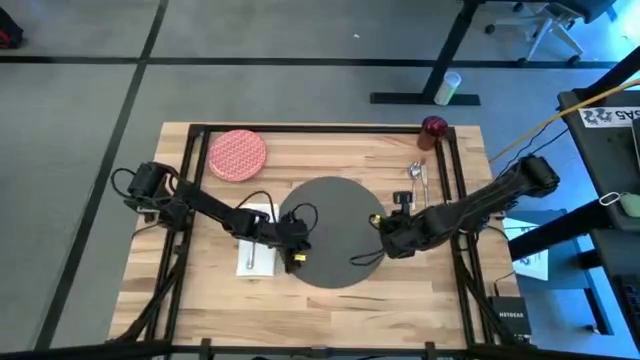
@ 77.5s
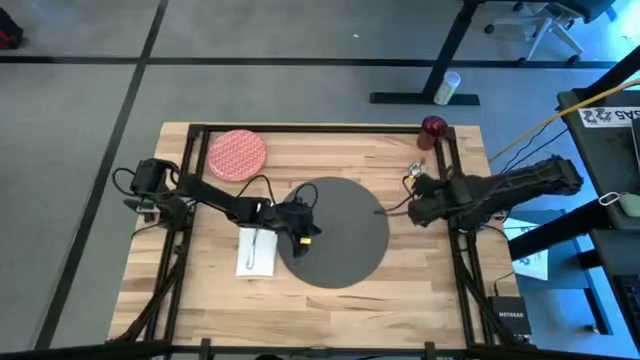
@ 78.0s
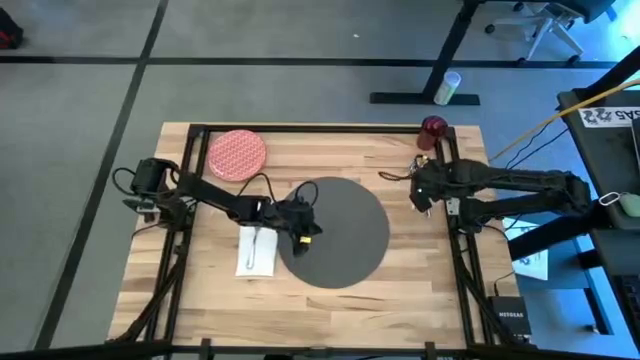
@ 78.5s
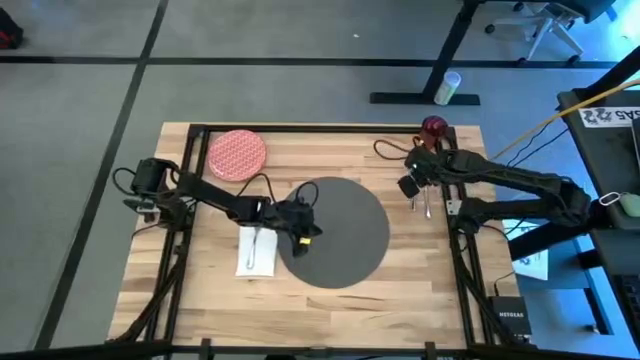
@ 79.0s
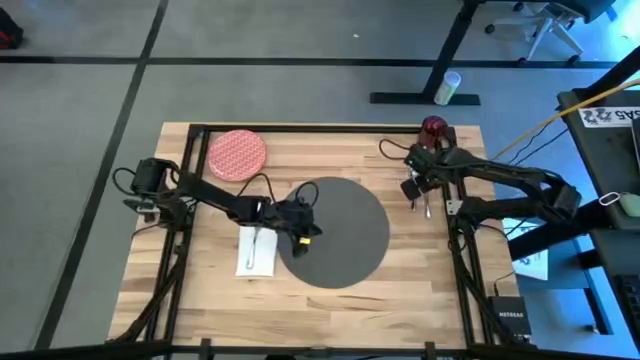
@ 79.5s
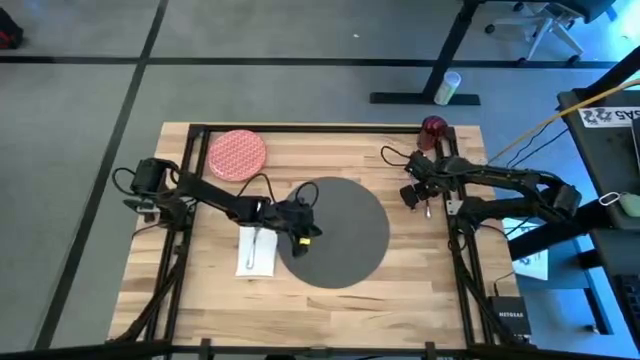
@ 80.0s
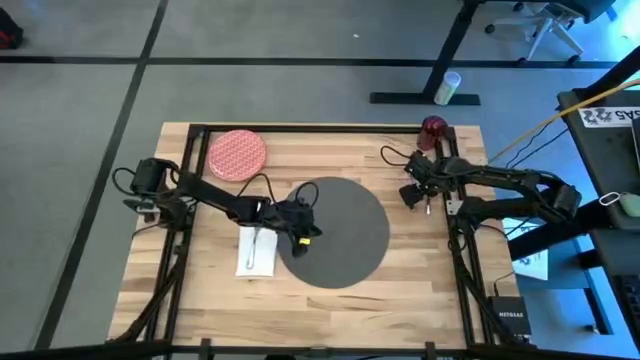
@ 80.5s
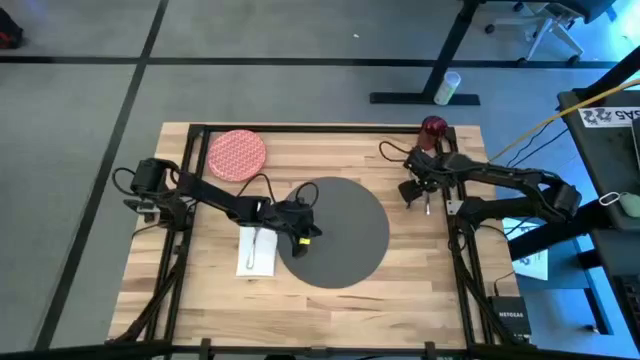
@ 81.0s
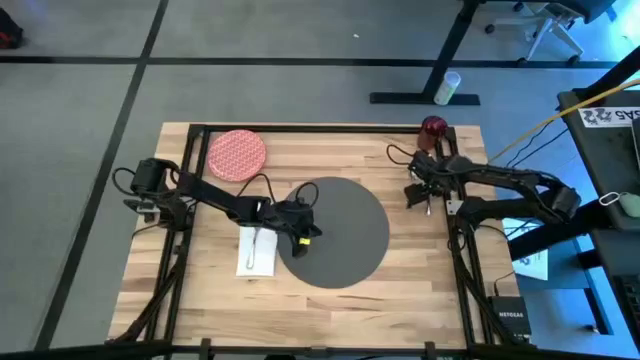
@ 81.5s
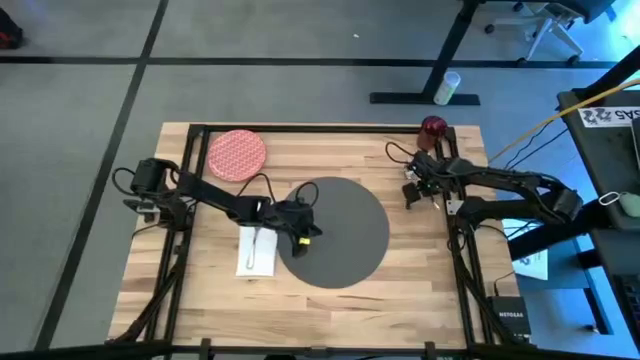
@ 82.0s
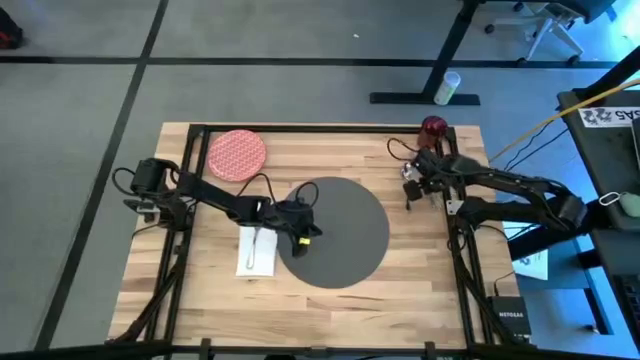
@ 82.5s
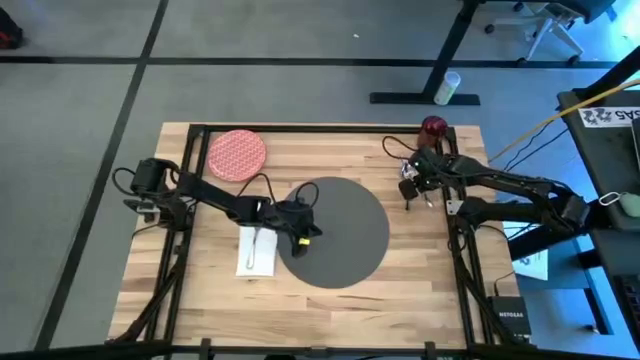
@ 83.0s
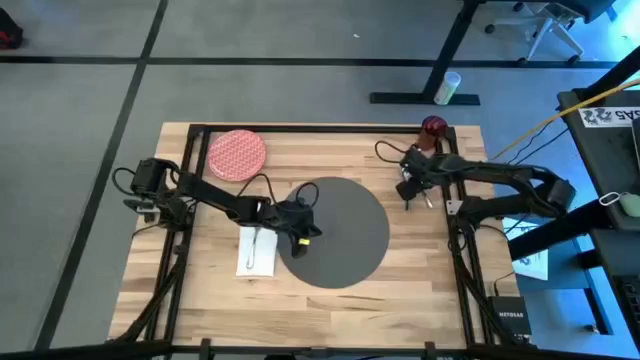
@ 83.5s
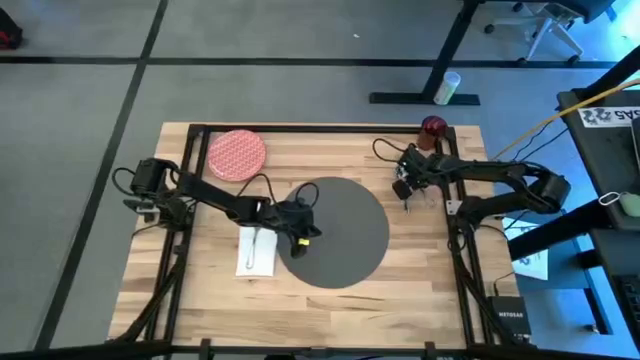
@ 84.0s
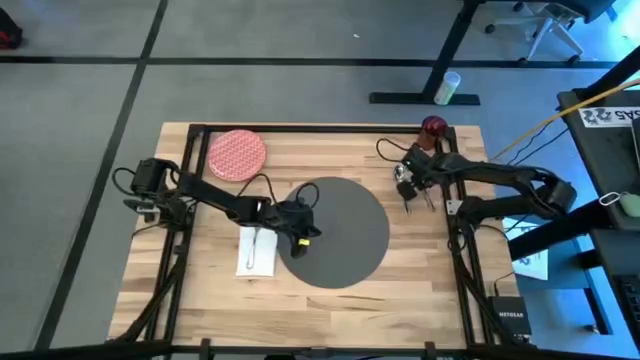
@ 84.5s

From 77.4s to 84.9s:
Task: Set table place
Put the silver table knife on the gray placemat

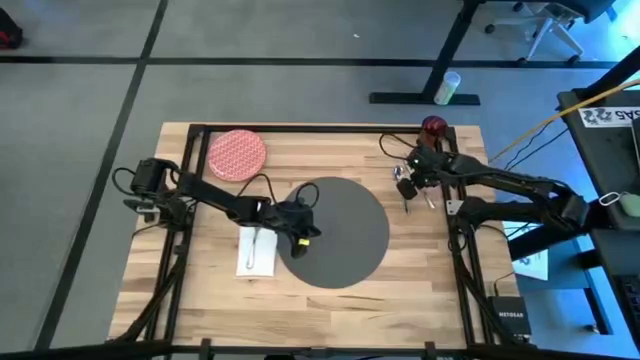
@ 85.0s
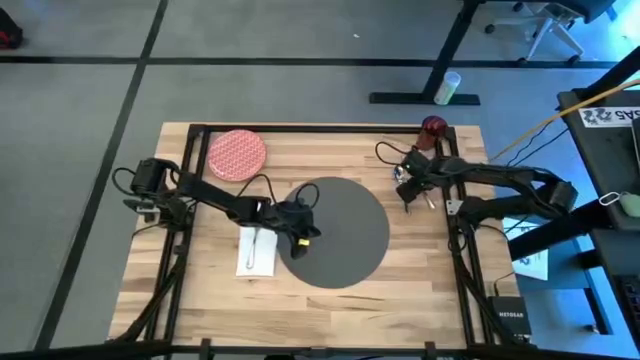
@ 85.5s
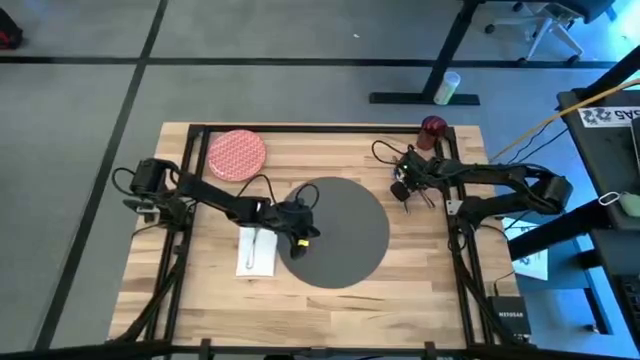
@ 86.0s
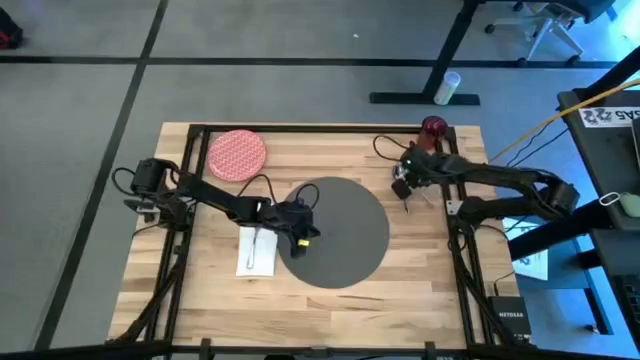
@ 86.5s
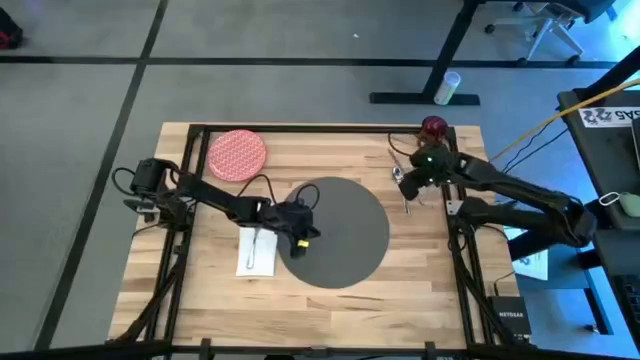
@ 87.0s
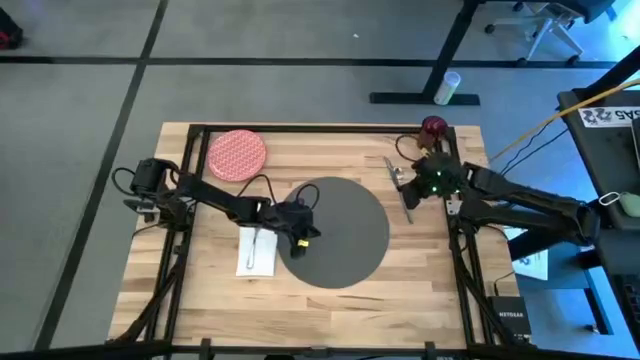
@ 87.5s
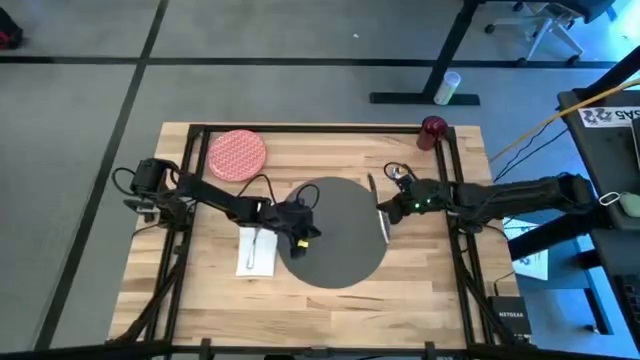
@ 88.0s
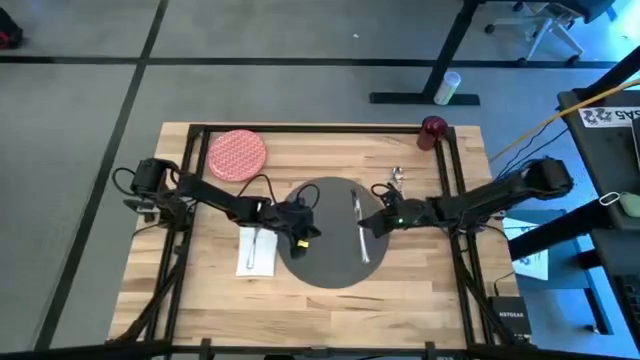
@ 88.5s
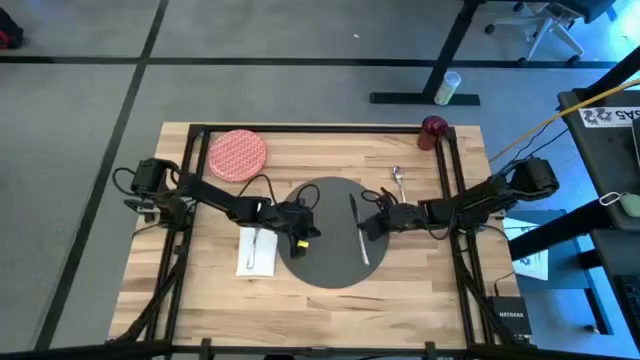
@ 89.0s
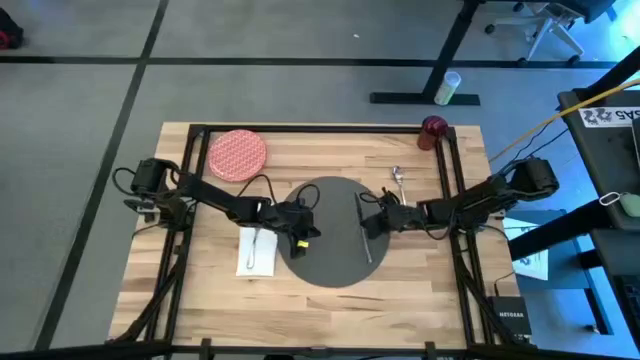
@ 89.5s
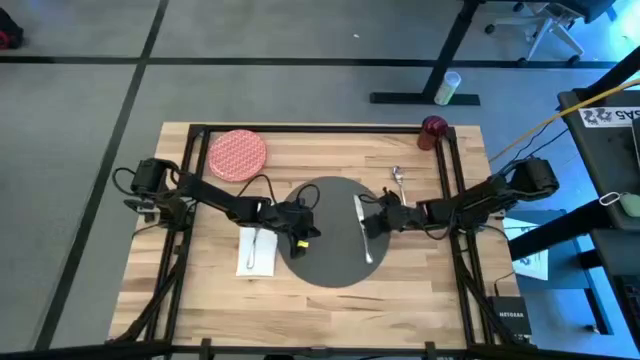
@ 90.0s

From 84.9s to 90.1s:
Put the silver table knife on the gray placemat

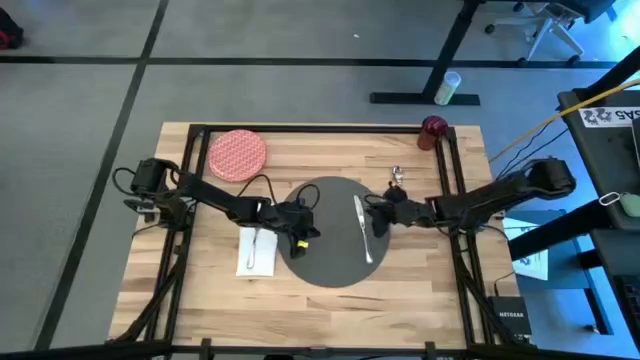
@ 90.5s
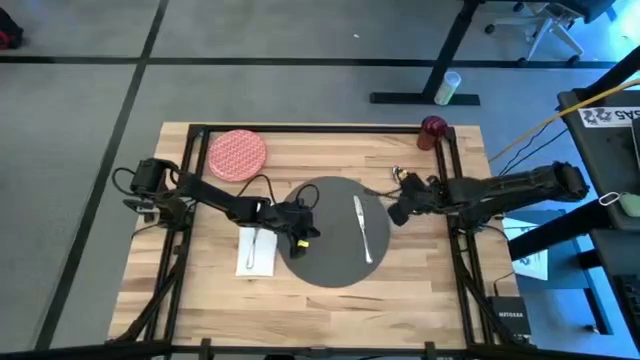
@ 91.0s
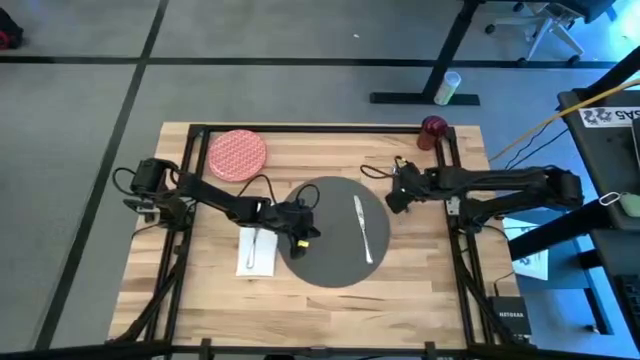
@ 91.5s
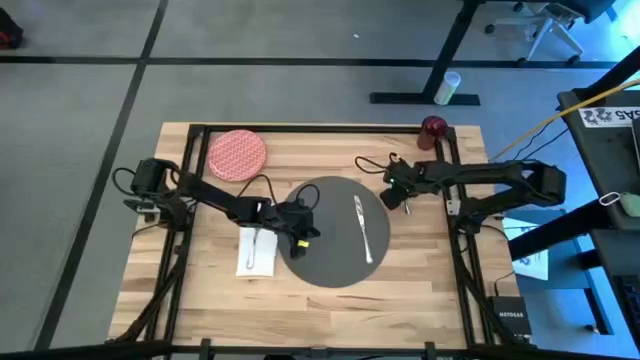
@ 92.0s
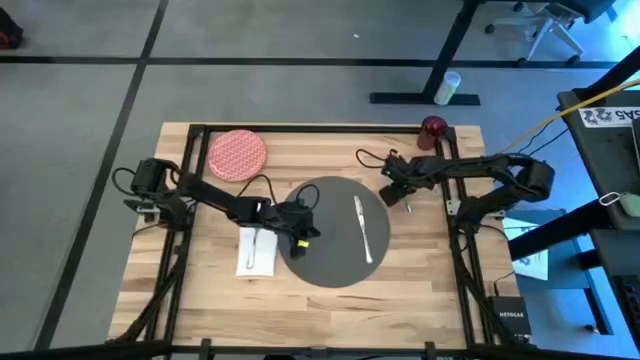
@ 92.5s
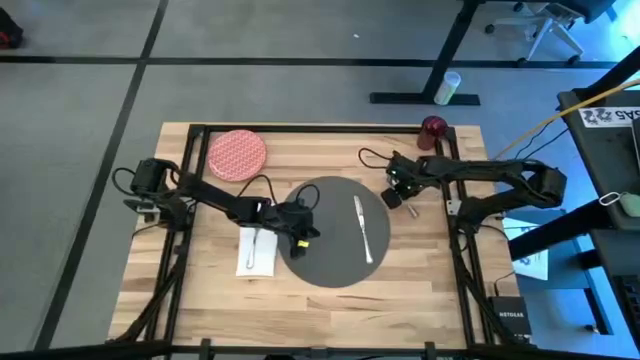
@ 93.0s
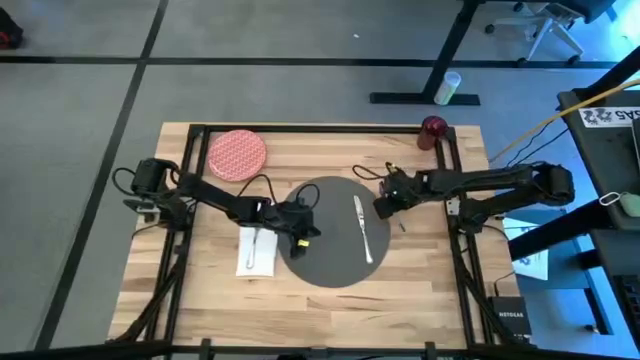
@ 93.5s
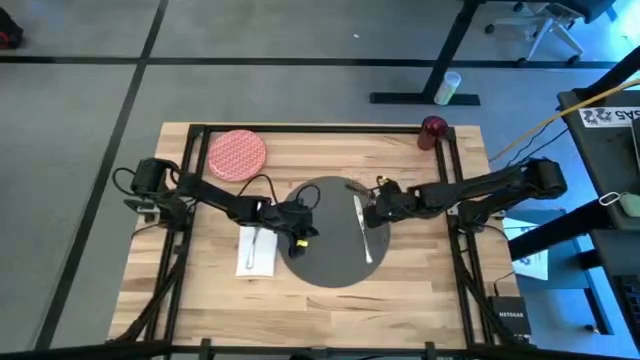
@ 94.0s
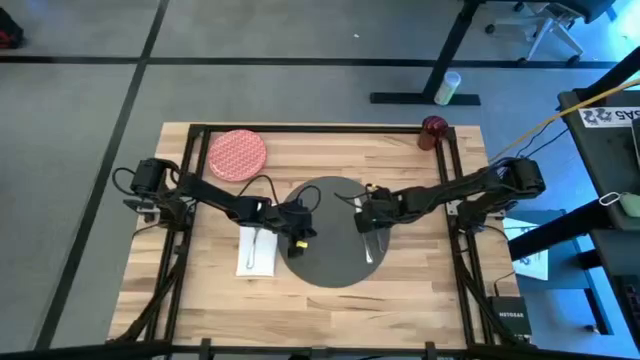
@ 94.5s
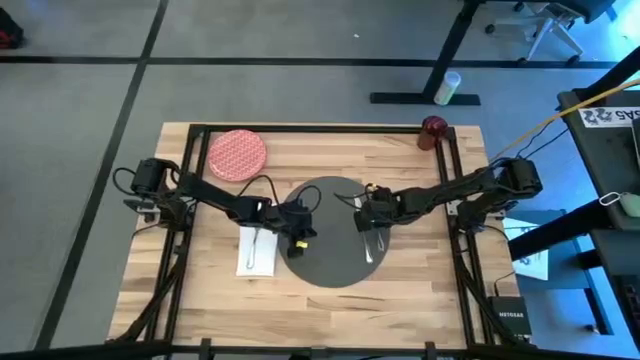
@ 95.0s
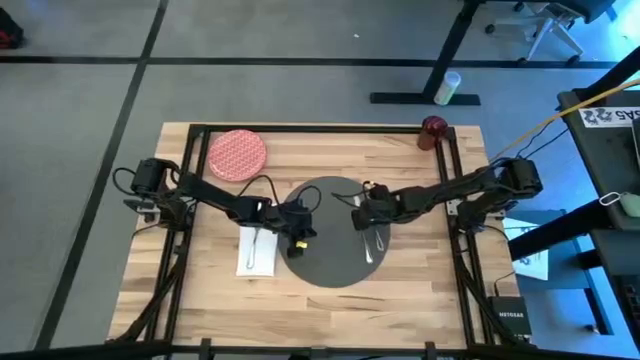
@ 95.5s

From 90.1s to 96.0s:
Put the silver spoon on the gray placemat to the left of the silver table knife
